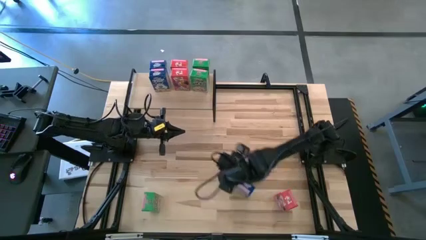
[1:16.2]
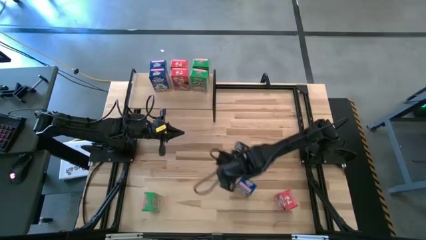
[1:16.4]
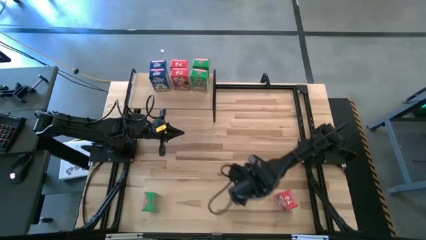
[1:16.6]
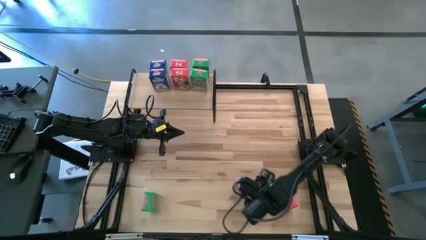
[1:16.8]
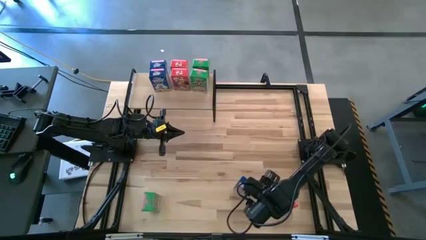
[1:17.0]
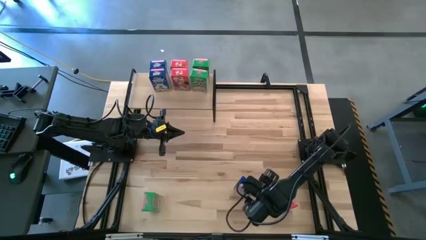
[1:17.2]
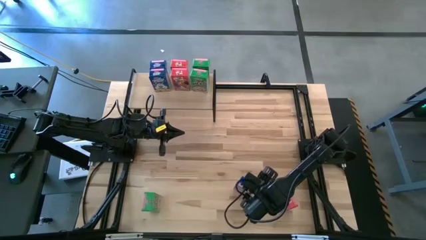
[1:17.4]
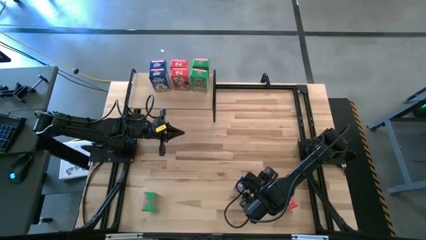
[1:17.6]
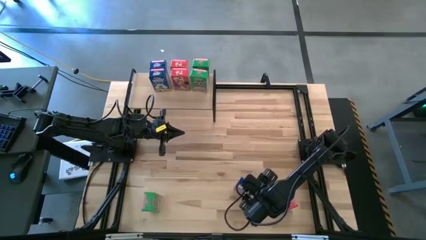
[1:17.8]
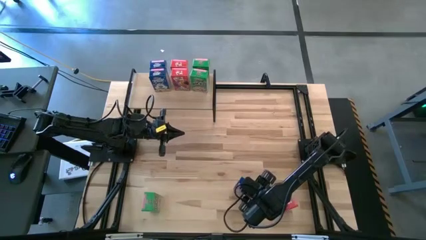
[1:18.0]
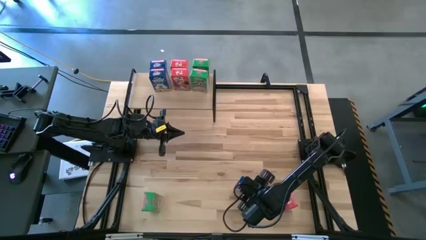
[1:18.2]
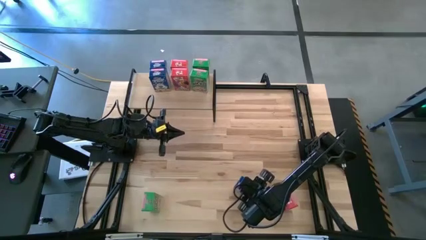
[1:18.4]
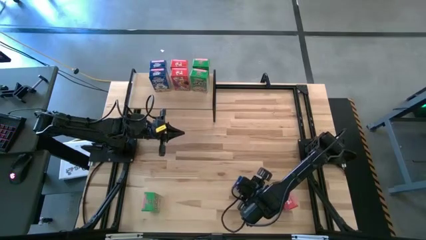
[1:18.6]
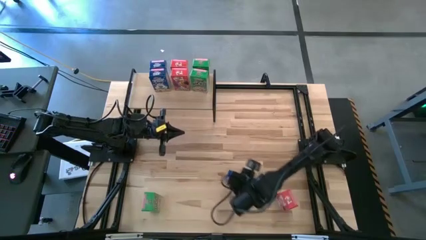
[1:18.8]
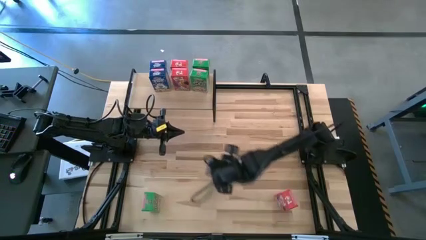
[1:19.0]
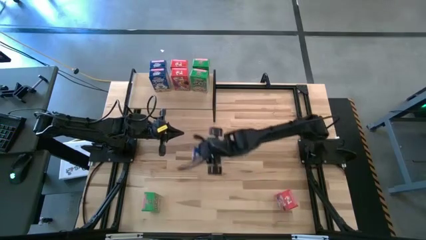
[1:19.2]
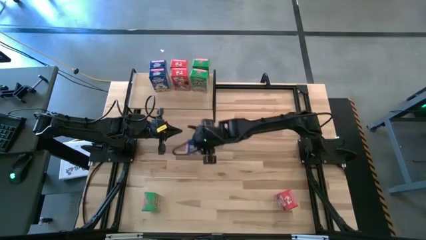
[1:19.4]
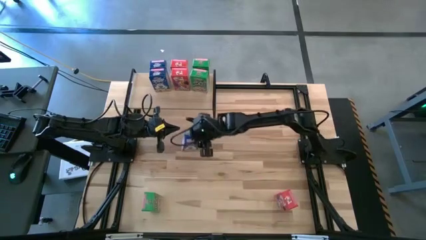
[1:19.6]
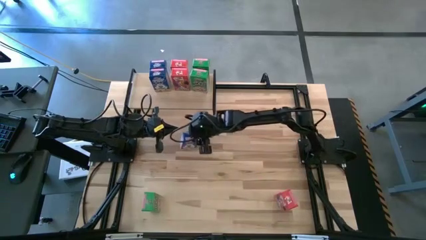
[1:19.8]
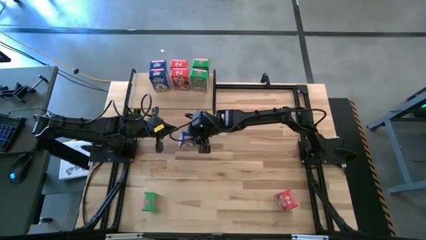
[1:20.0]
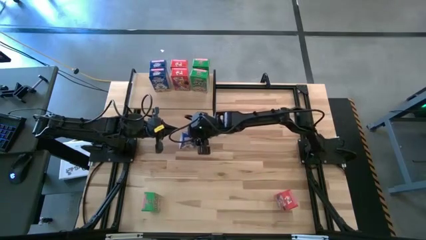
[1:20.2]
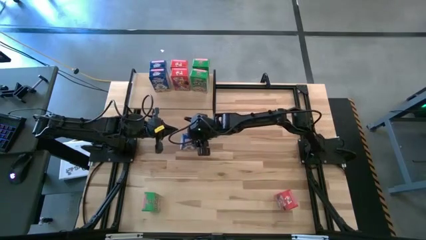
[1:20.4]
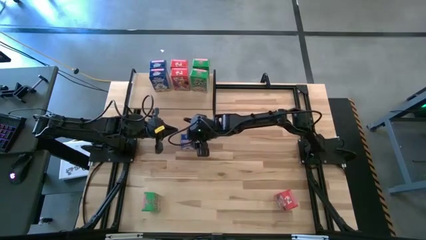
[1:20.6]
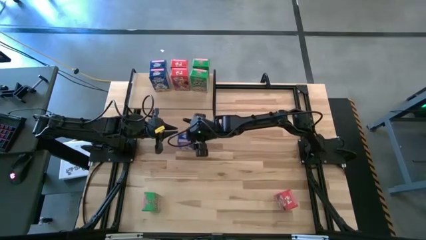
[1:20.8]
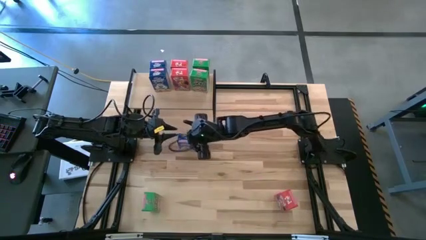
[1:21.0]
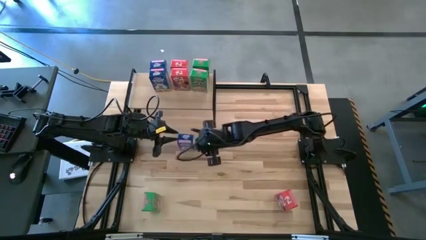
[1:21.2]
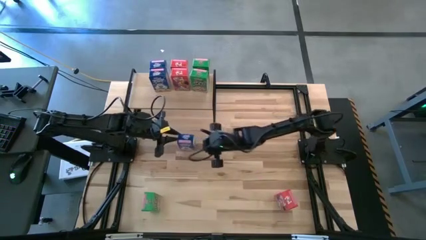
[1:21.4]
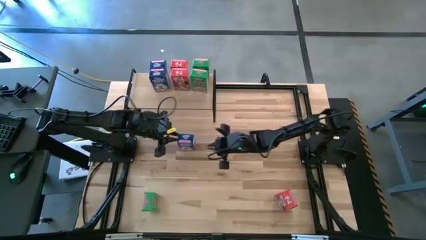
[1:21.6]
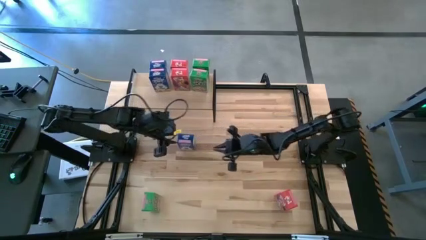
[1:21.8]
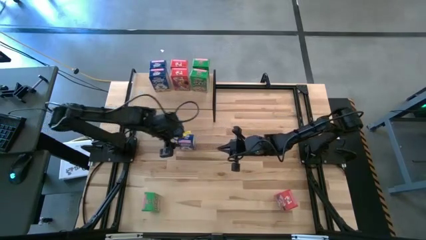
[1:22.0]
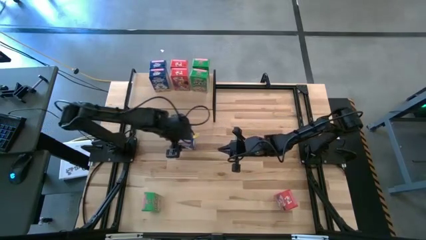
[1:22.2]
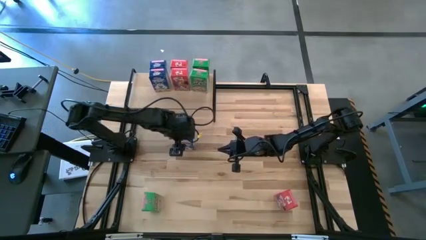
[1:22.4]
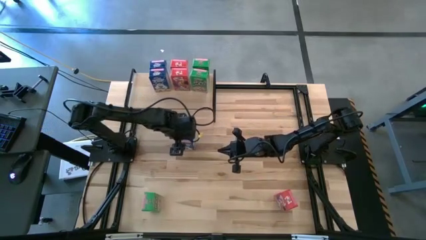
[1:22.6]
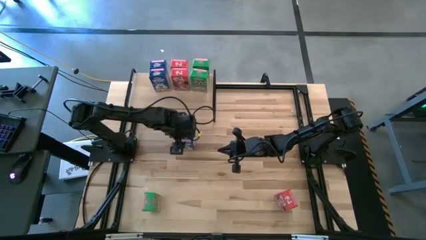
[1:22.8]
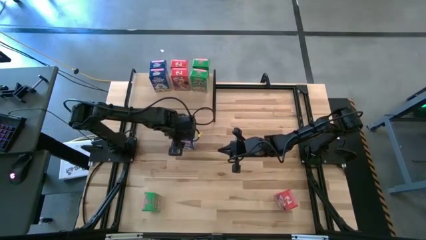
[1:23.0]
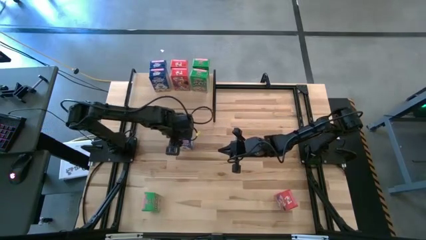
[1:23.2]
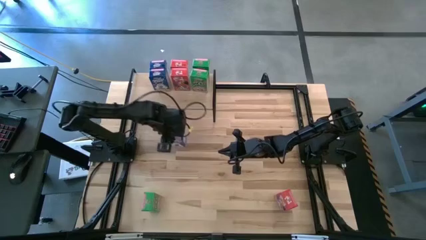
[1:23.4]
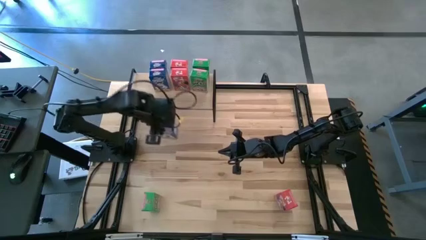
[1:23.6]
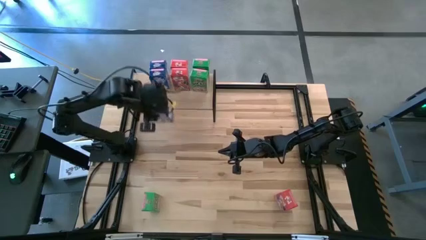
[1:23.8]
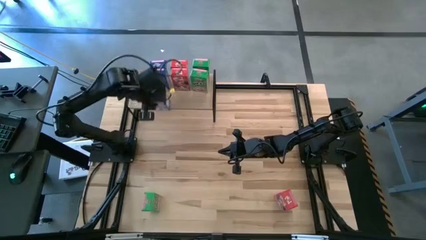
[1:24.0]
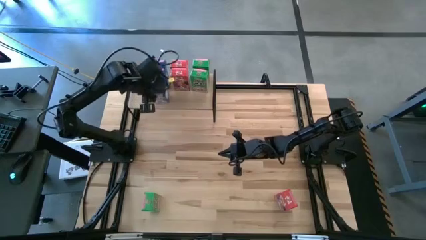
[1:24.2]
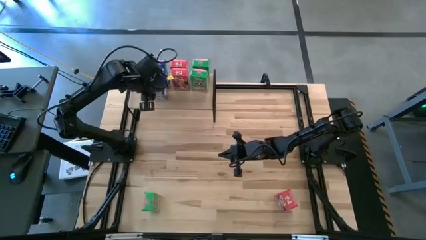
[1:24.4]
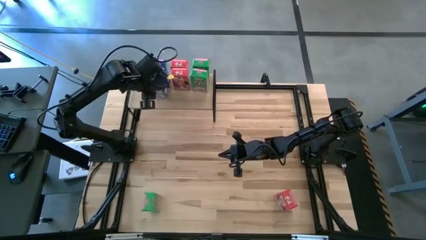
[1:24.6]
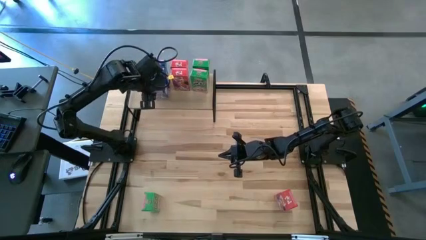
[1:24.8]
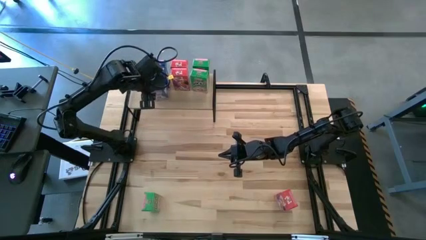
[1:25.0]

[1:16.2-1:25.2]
Task: Stack cereal on shelf
Put the blue cereal box on the shelf aligned with the other blue cereal boxes

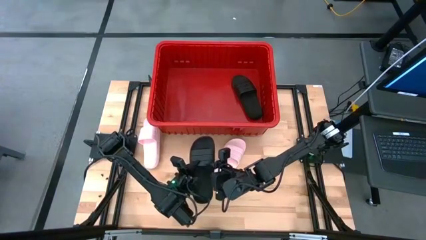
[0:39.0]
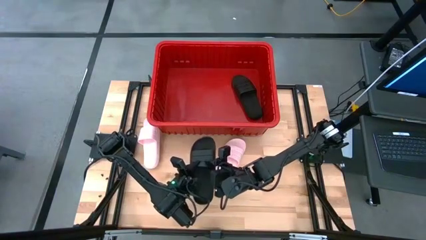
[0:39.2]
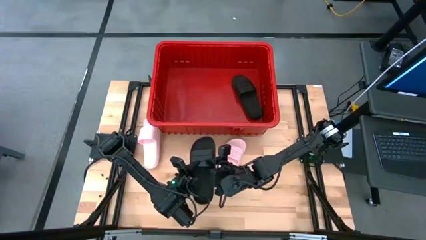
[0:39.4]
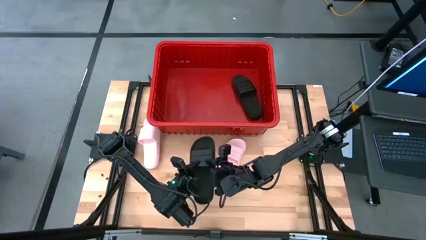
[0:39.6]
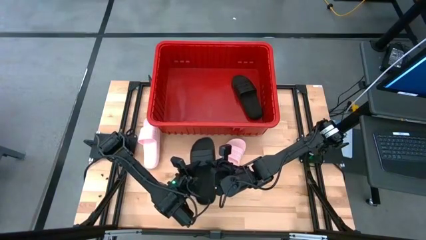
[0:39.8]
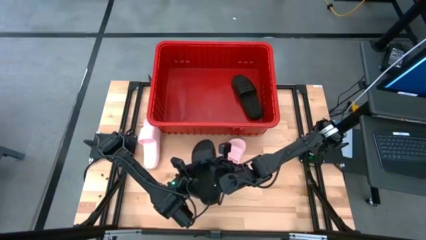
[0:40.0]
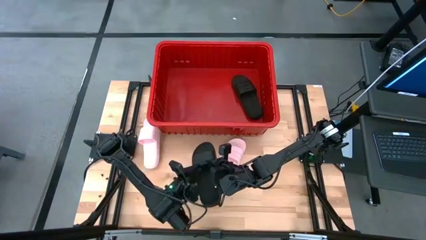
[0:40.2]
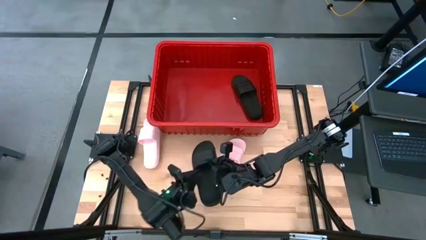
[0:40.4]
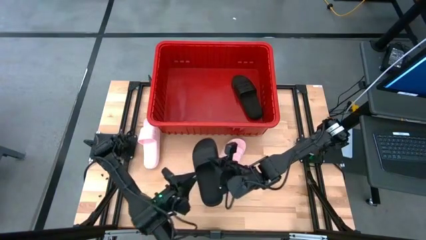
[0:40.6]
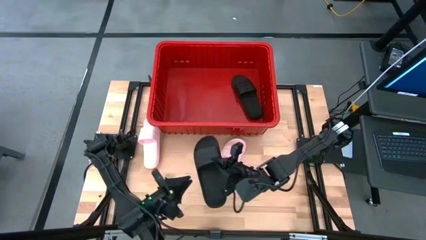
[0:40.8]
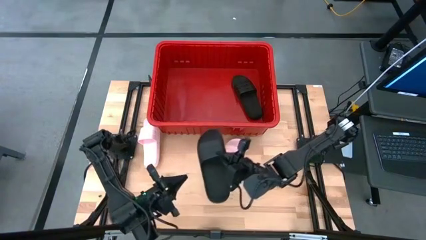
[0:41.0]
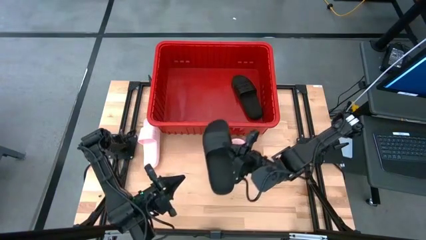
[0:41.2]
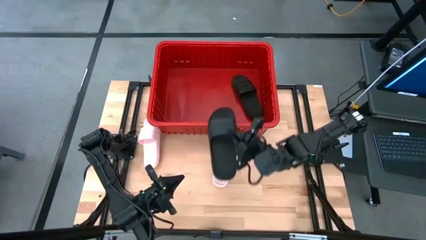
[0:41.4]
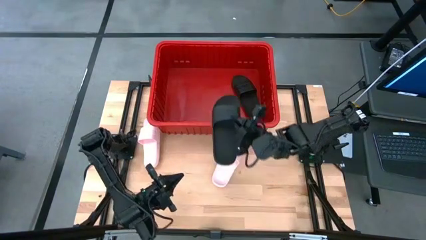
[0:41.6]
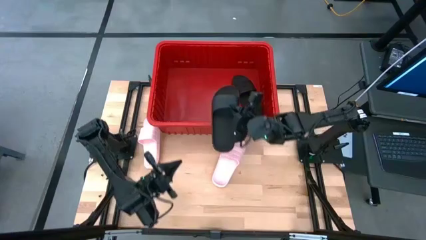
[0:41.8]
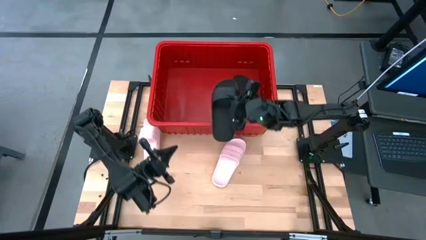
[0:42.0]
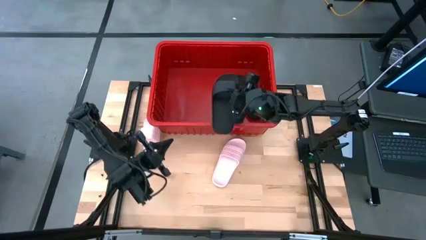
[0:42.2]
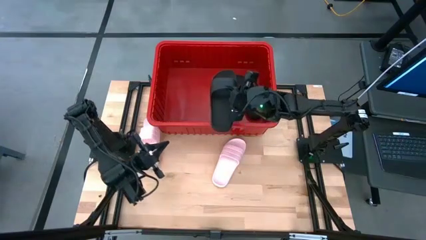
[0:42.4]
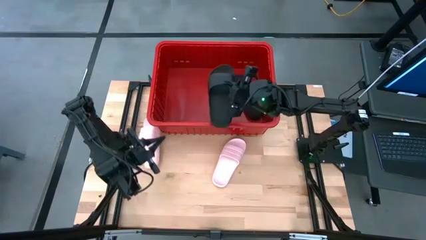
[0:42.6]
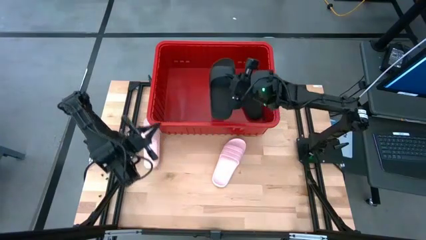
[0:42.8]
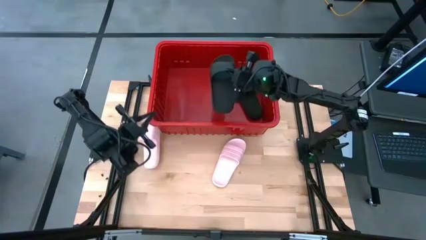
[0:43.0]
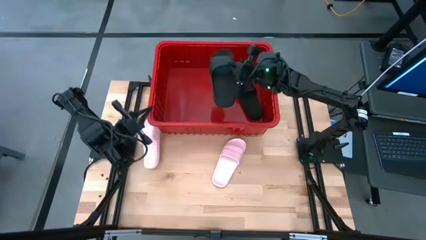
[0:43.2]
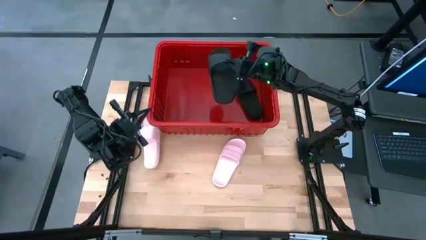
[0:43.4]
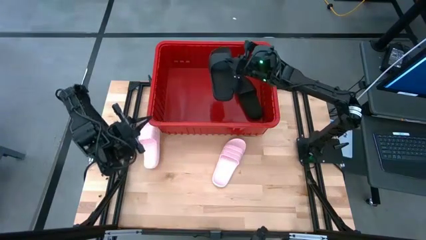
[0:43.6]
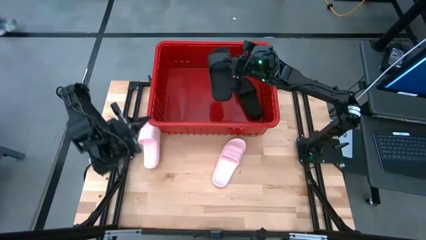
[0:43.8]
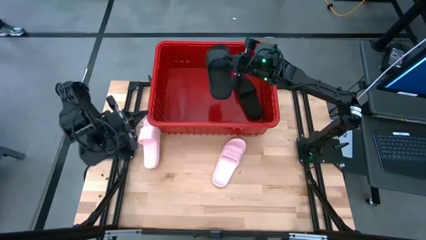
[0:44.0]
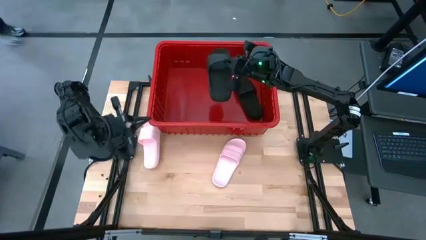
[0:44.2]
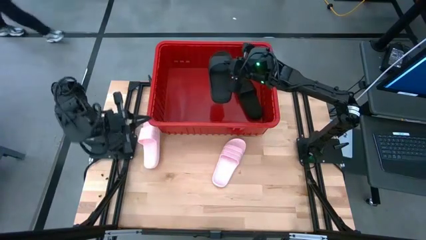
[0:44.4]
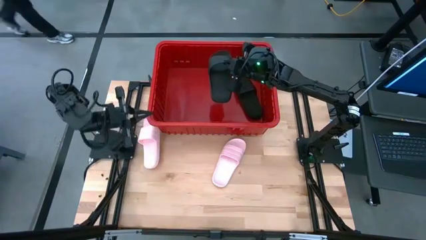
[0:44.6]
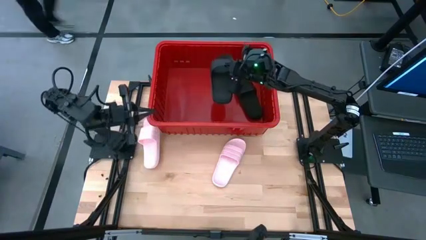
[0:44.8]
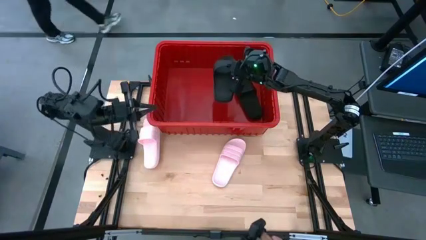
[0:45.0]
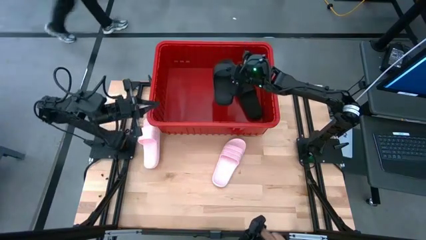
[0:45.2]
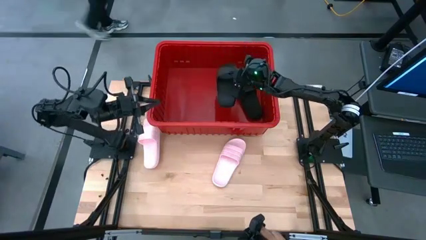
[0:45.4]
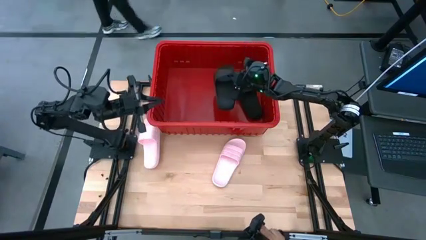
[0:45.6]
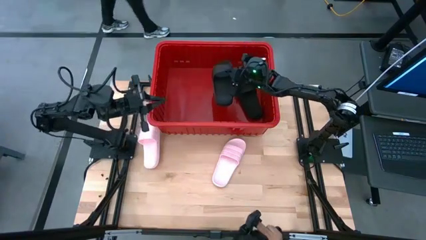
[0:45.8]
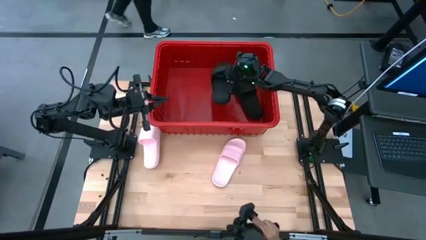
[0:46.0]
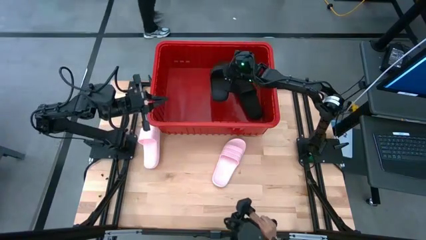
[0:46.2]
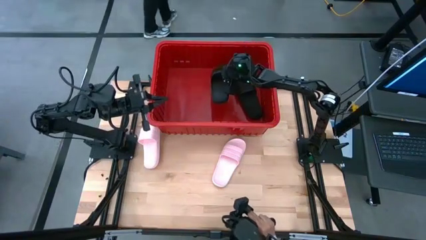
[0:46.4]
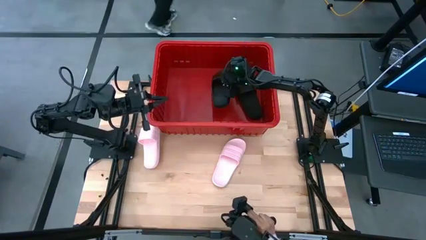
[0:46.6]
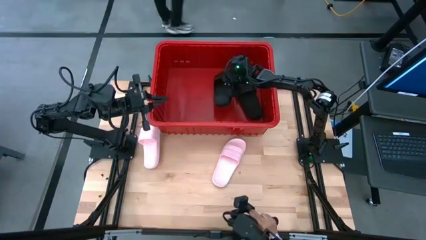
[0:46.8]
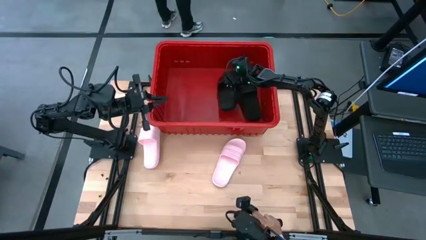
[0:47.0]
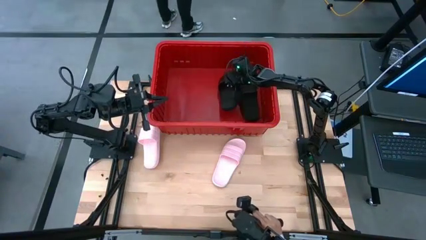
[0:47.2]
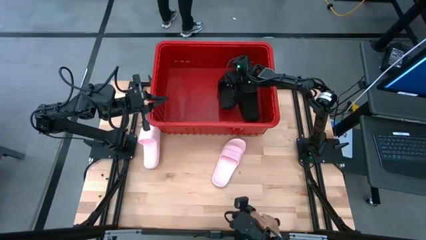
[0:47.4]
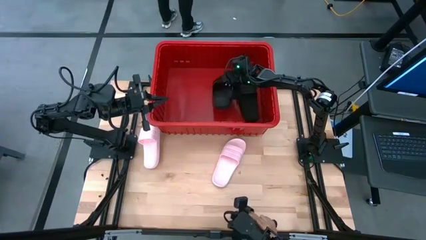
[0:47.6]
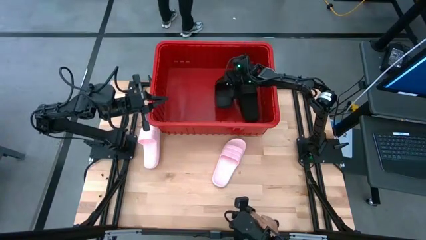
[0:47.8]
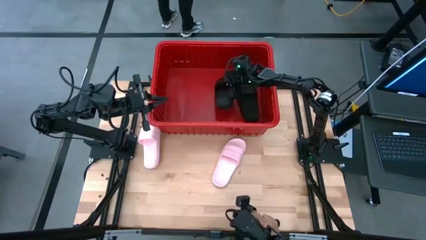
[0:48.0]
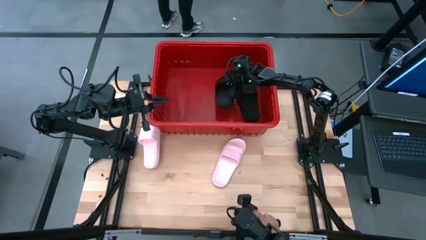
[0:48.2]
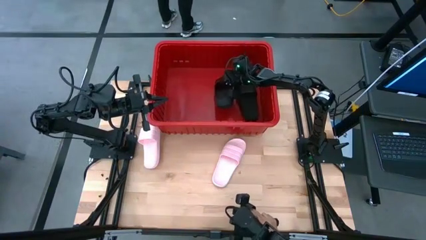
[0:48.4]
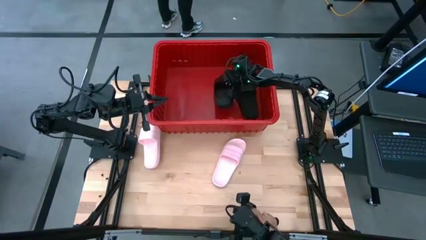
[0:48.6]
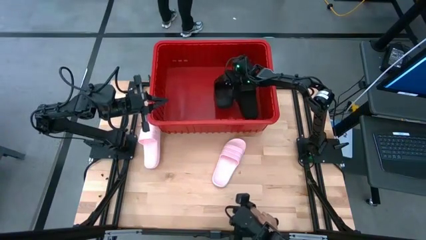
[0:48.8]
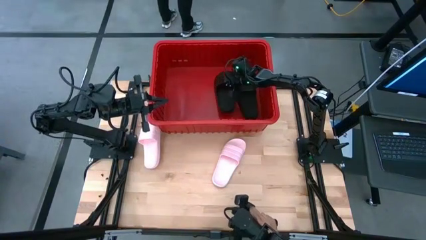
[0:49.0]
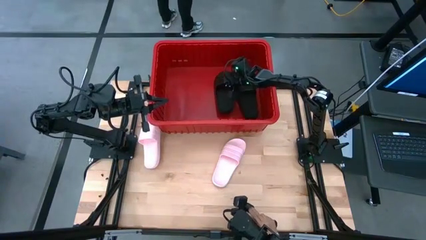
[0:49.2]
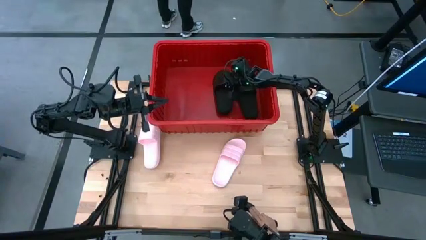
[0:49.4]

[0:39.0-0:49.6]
Task: Pick and place slides into bin
Put the black slide into the bin
